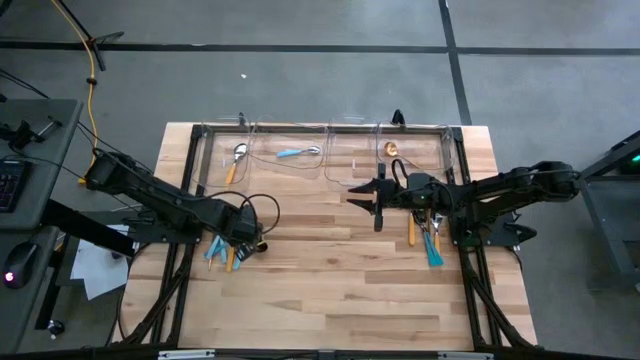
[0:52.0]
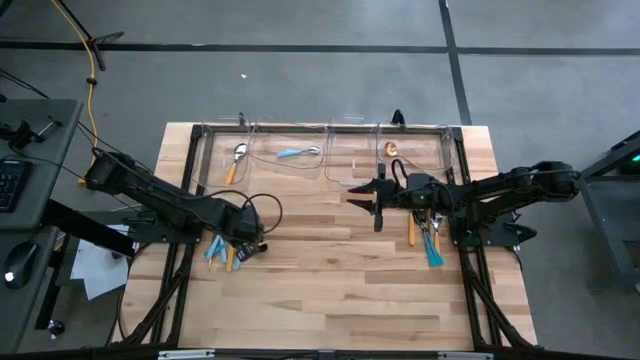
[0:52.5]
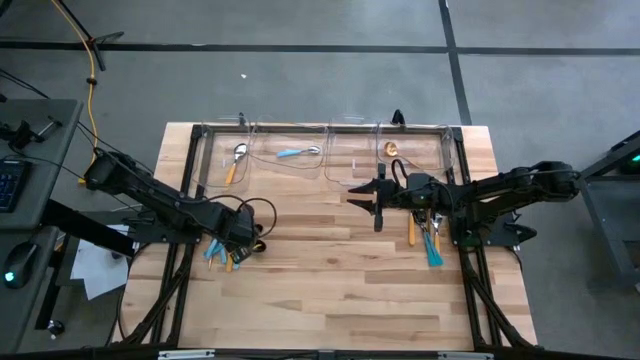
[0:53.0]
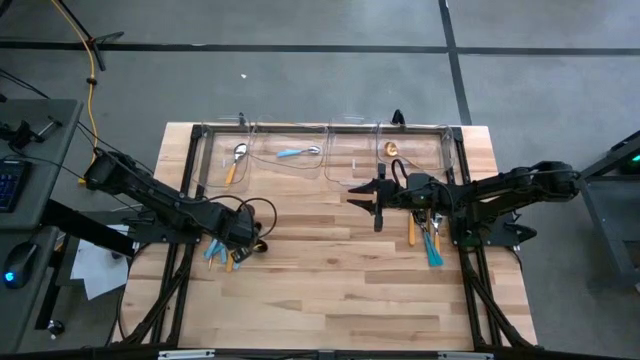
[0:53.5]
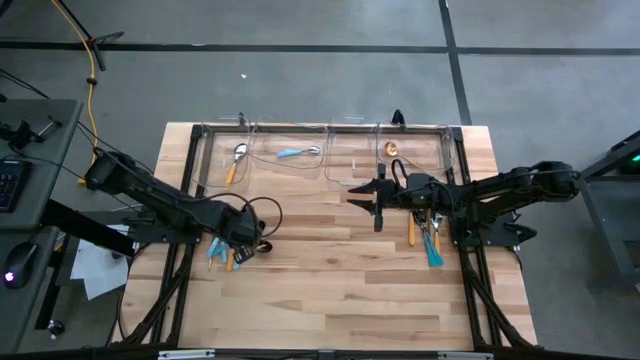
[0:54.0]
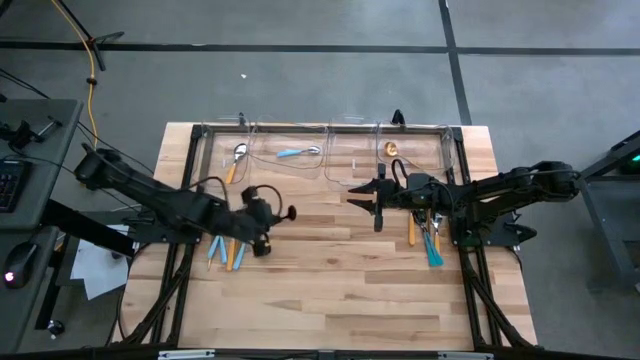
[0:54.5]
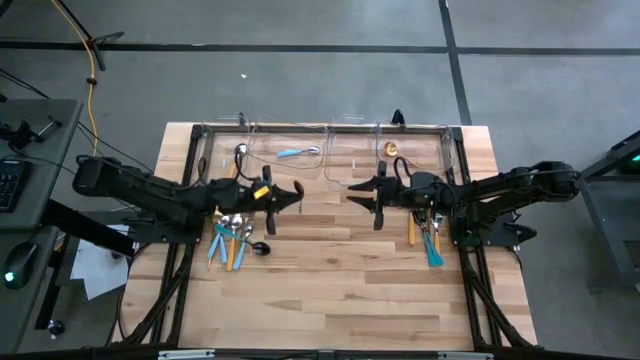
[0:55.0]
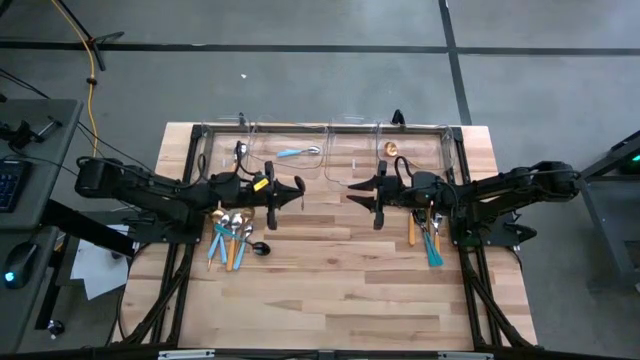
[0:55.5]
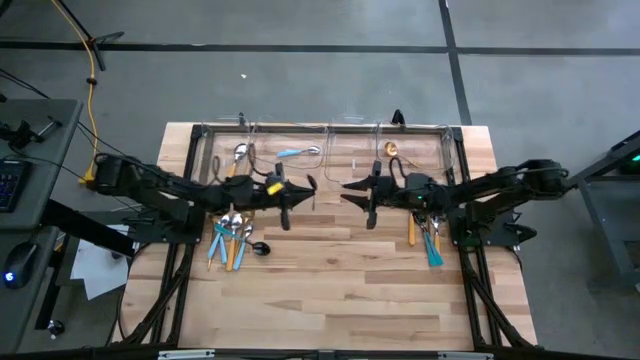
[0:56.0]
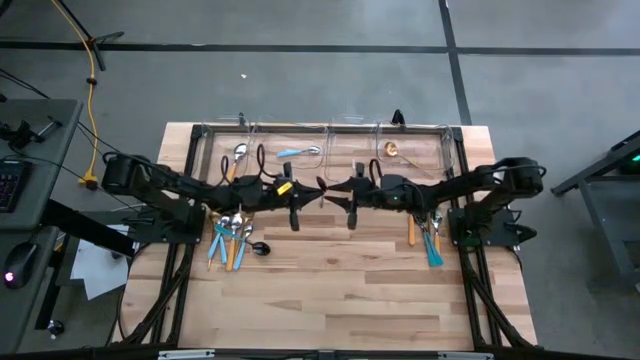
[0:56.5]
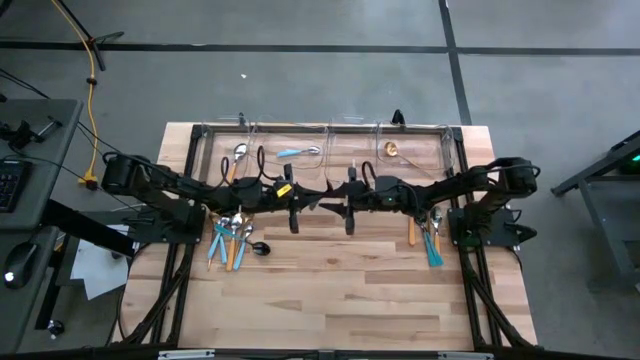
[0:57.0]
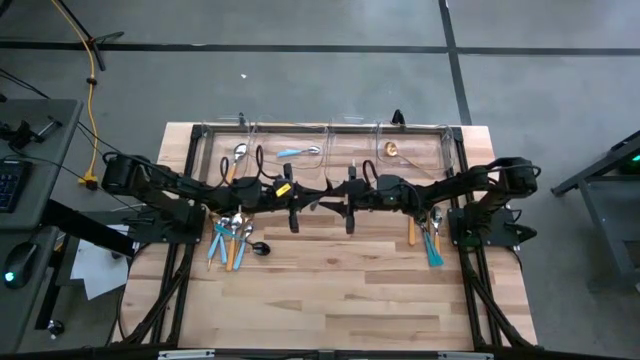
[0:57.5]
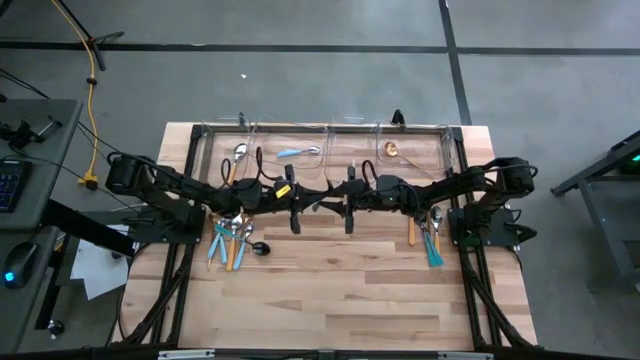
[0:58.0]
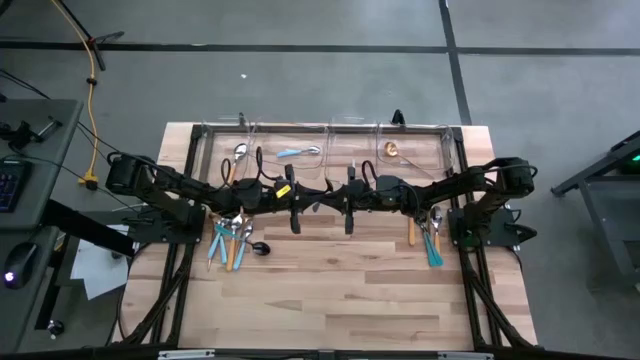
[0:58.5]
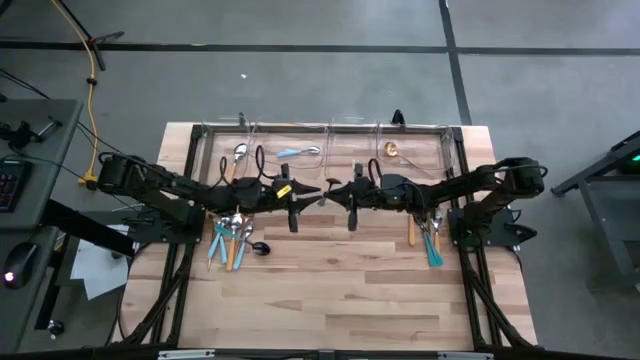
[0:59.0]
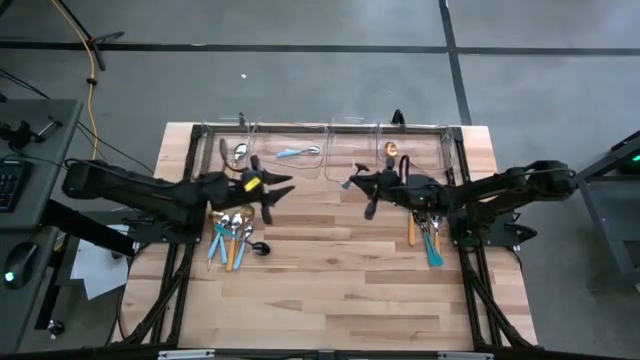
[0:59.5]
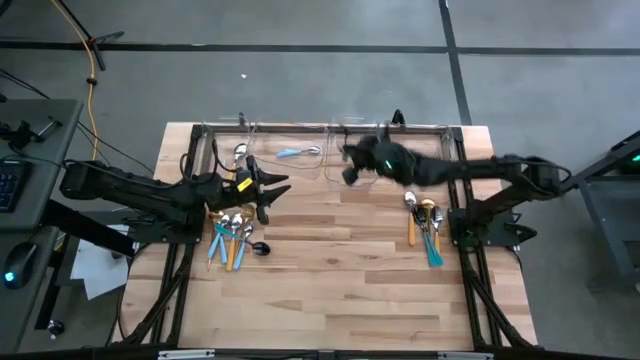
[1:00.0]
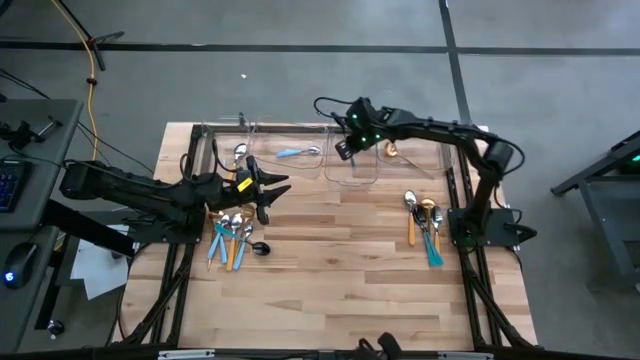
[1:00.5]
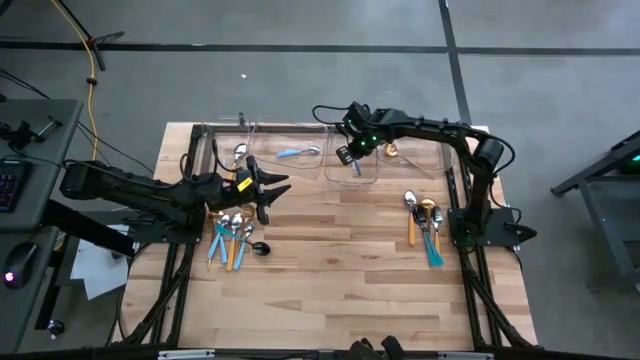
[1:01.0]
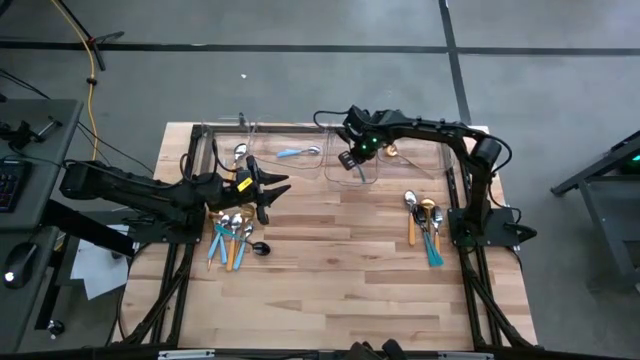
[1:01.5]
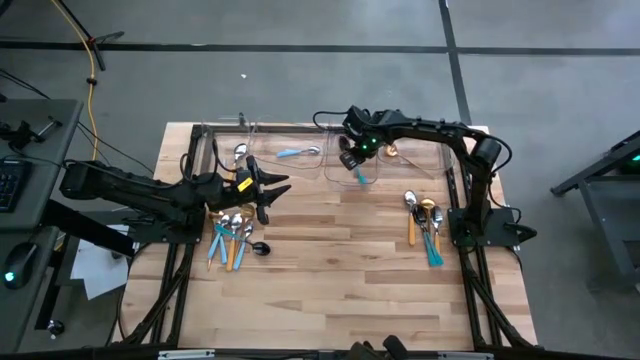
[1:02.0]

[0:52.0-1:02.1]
Task: Sort silverware by color (type)
Put the black spoon into the middle right transparent bin

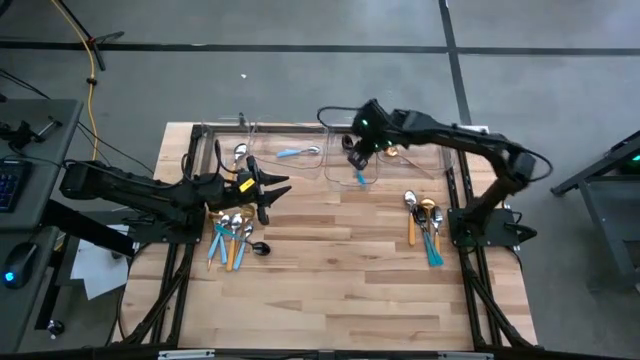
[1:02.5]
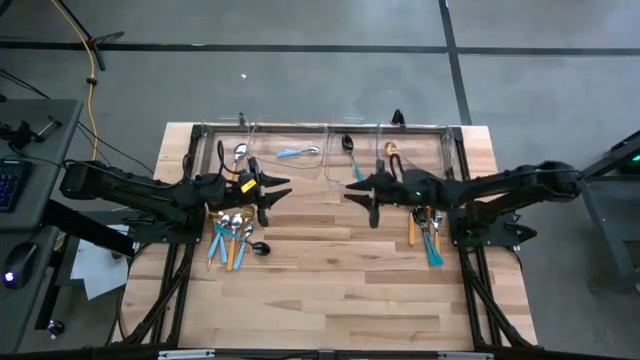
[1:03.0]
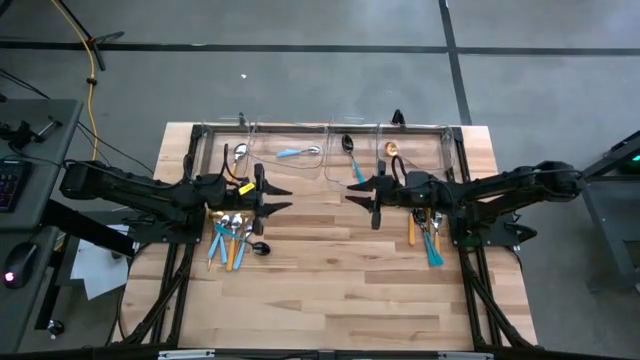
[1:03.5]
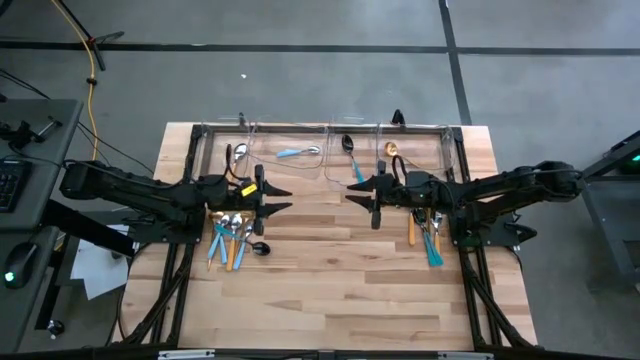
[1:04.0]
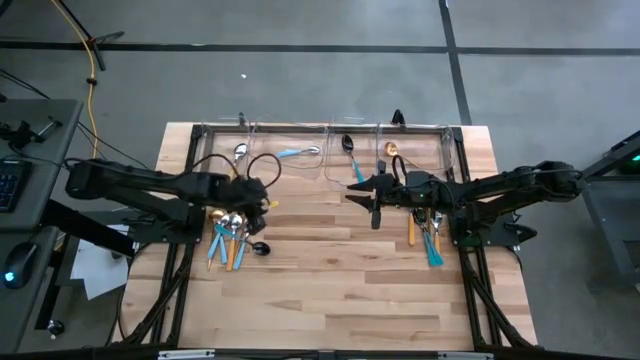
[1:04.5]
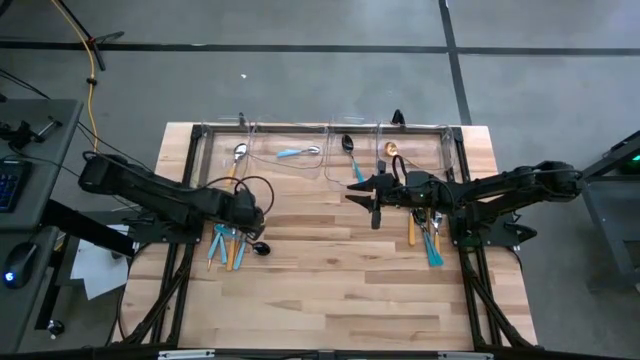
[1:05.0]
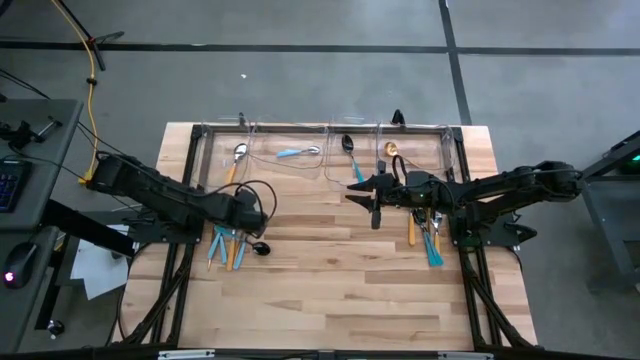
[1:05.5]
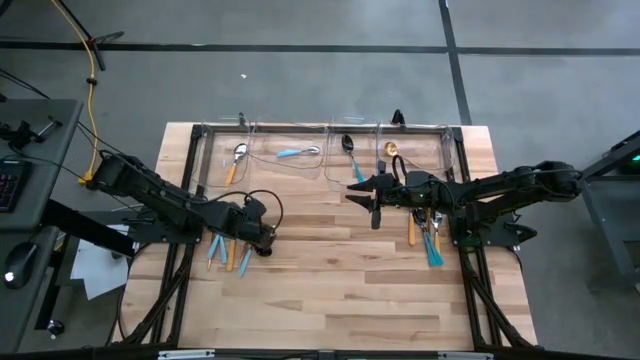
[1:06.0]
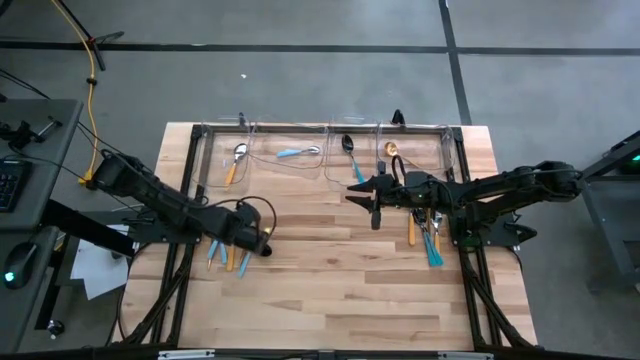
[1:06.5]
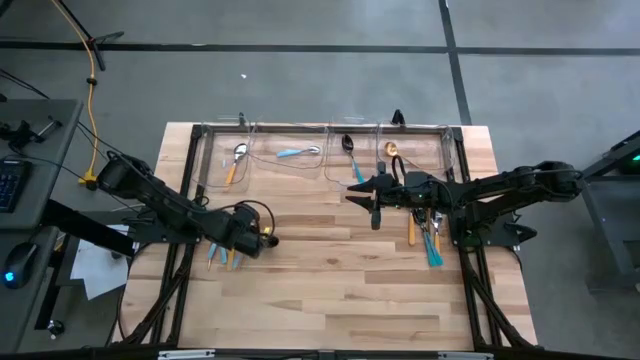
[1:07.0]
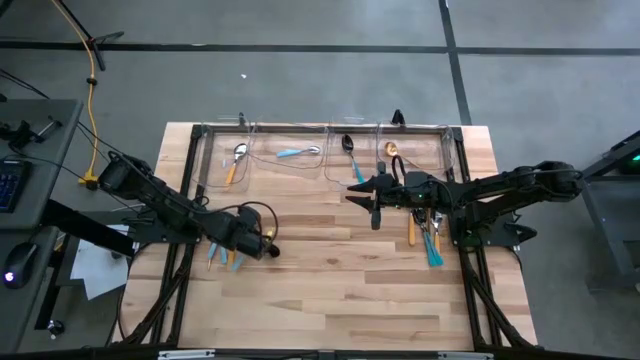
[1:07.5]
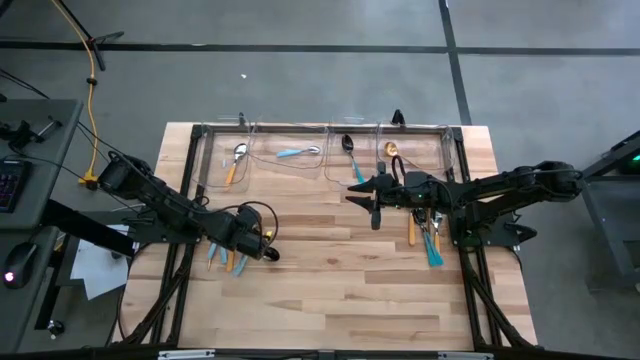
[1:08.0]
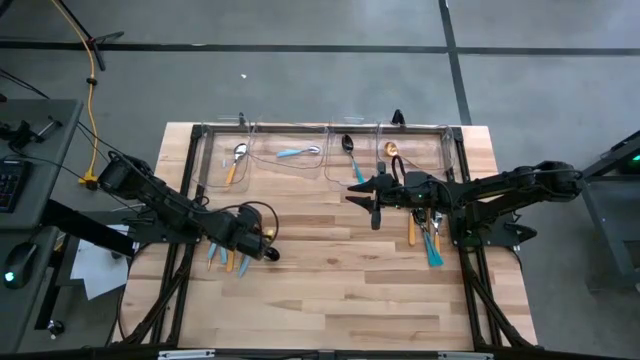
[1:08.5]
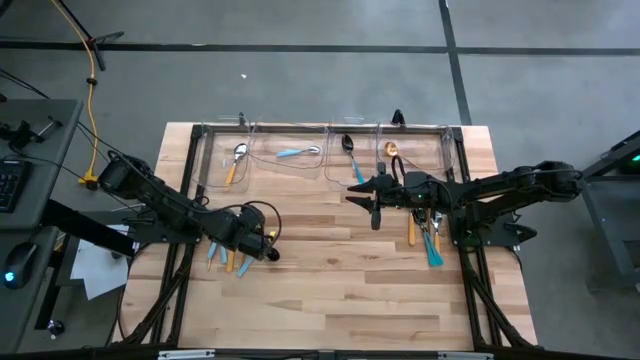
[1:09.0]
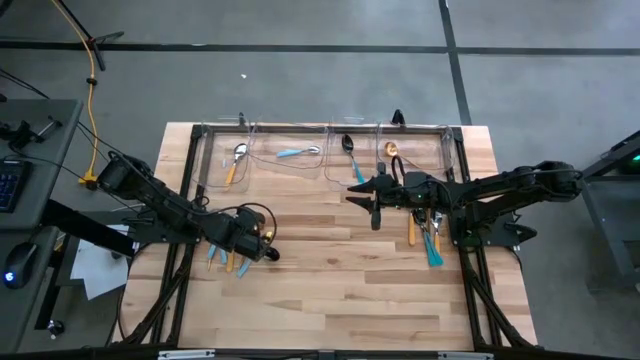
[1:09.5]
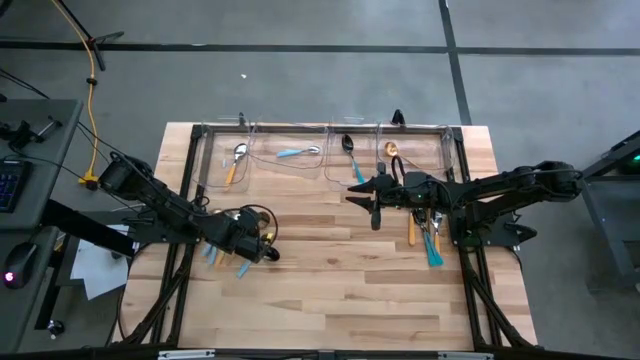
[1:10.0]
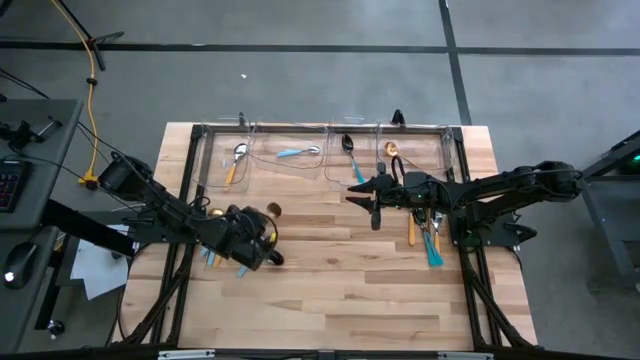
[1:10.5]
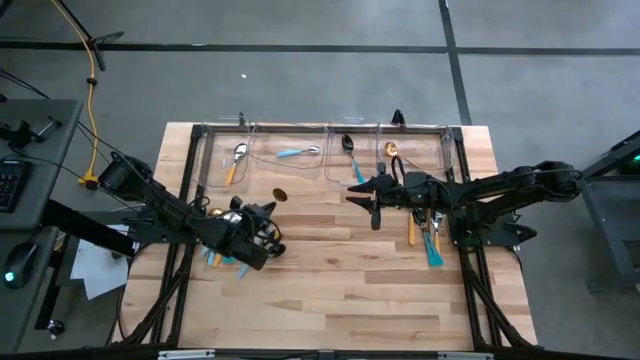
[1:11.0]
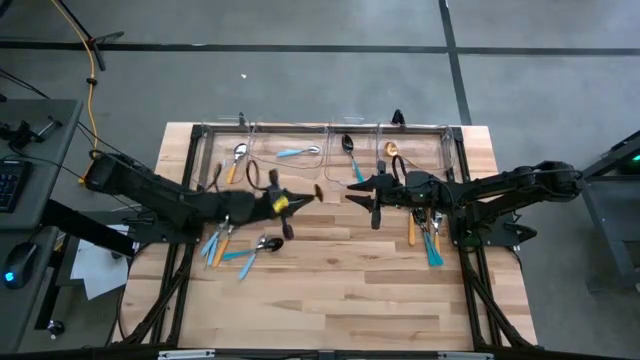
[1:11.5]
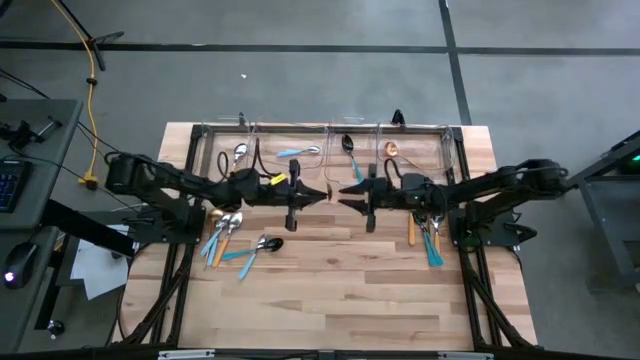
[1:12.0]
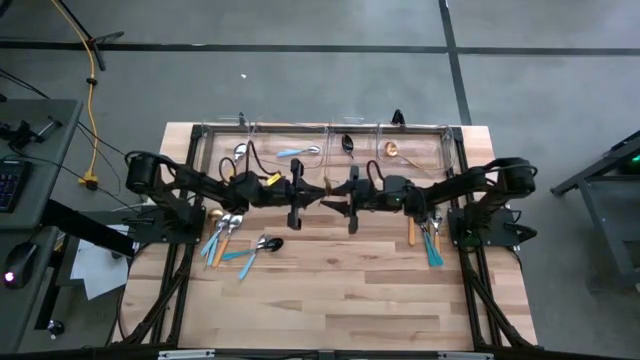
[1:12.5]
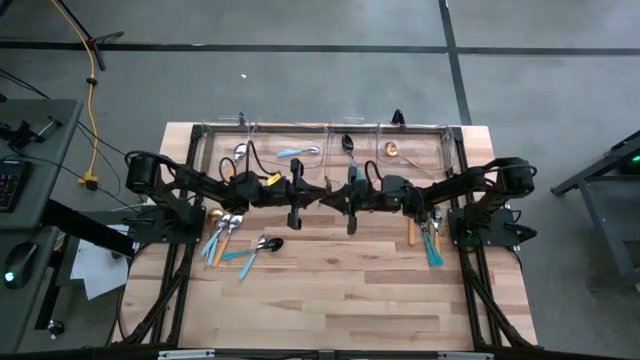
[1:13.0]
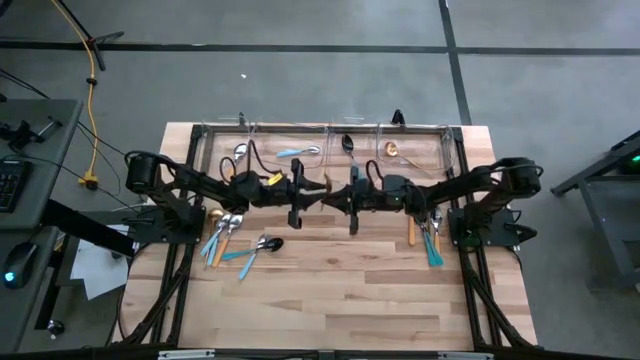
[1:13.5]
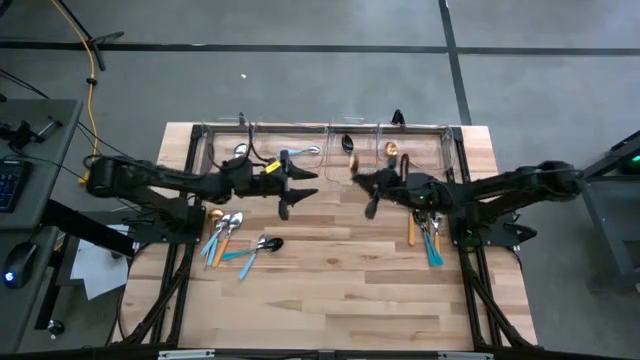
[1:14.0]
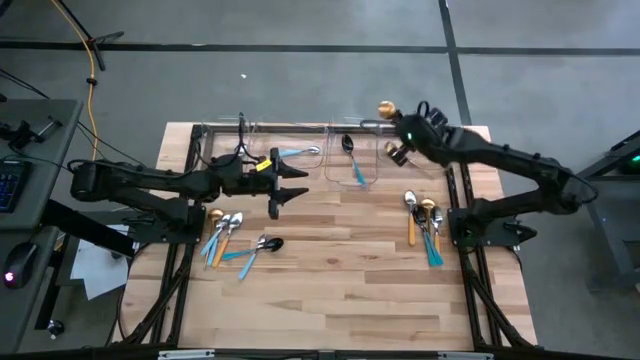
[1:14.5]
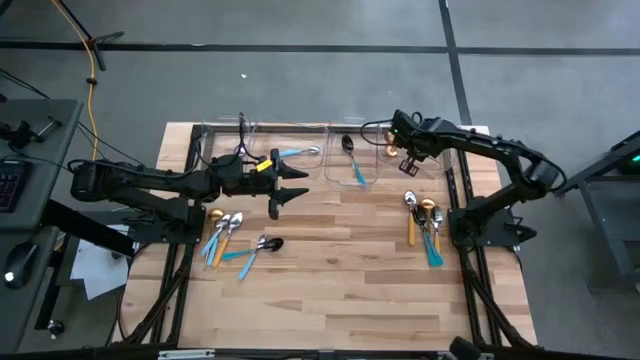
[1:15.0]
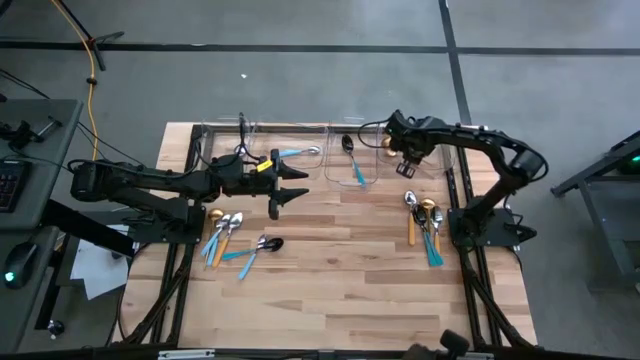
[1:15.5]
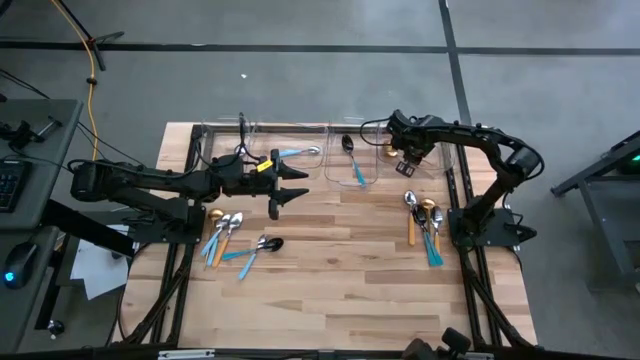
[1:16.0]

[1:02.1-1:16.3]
Put the gold spoon into the right transparent bin
